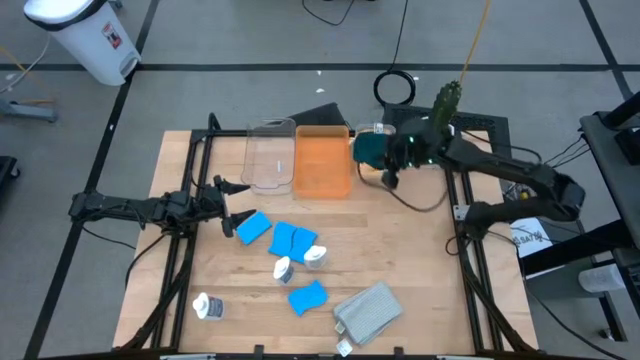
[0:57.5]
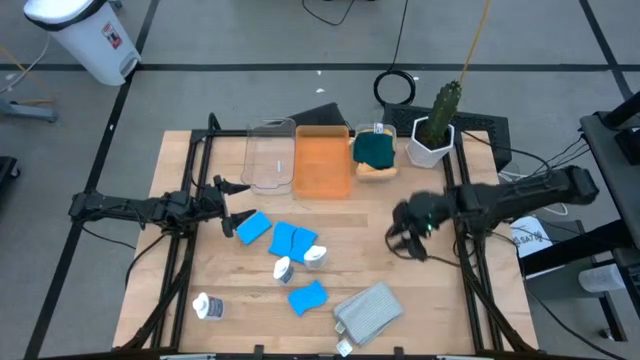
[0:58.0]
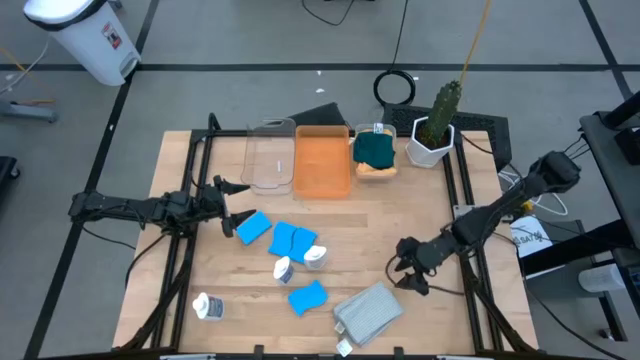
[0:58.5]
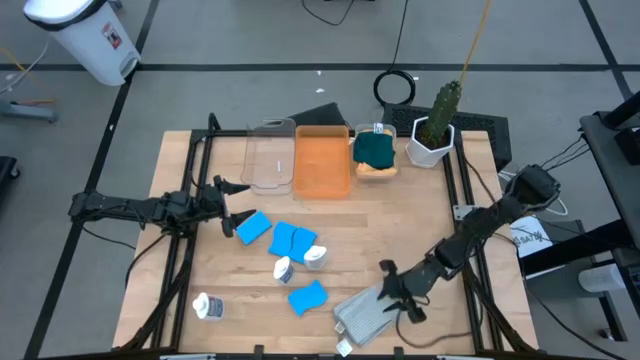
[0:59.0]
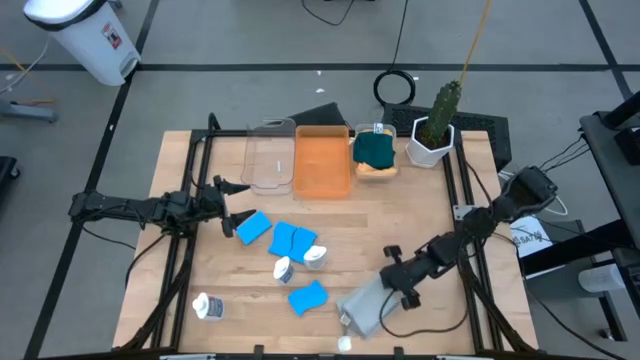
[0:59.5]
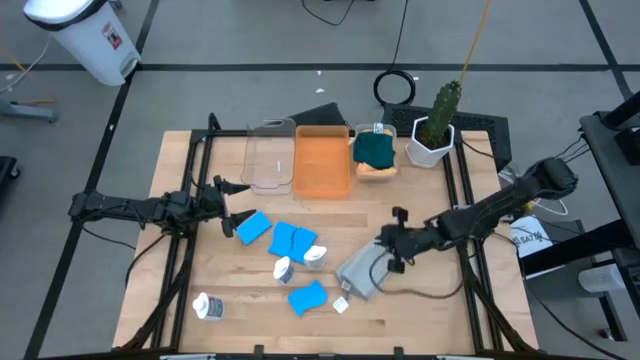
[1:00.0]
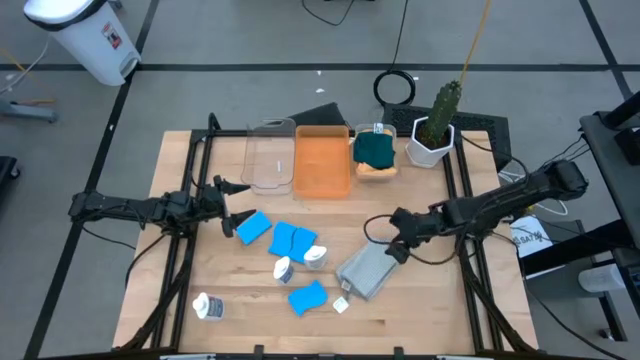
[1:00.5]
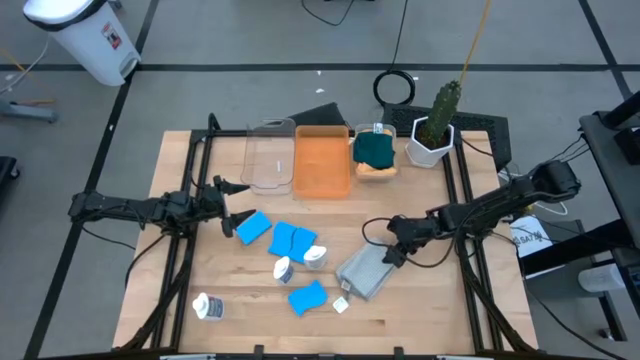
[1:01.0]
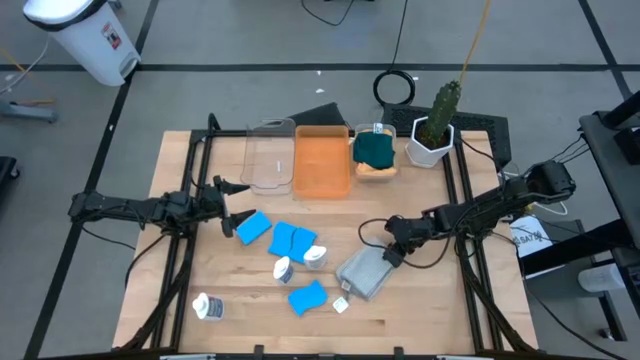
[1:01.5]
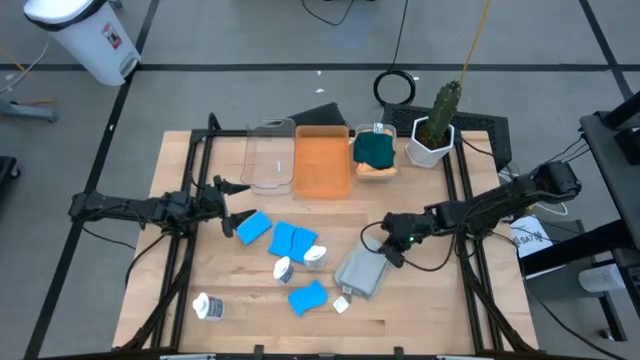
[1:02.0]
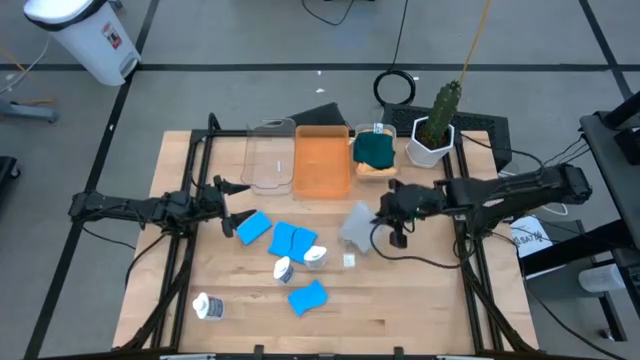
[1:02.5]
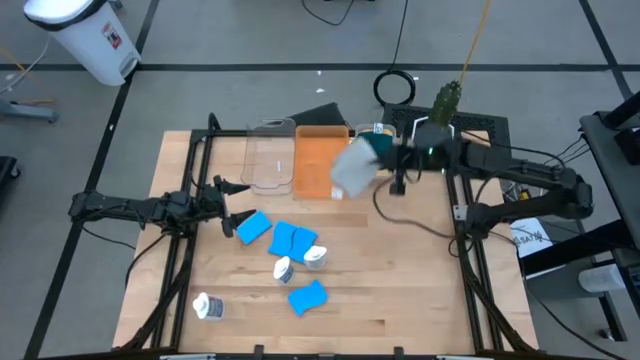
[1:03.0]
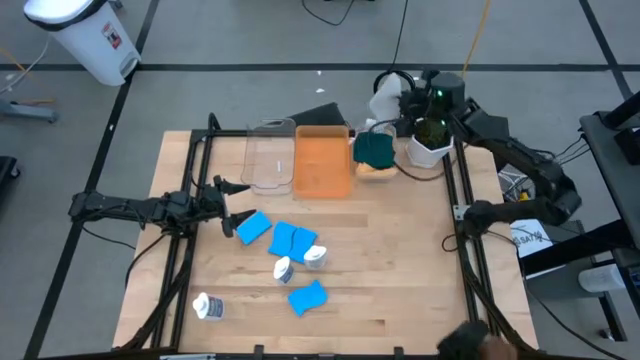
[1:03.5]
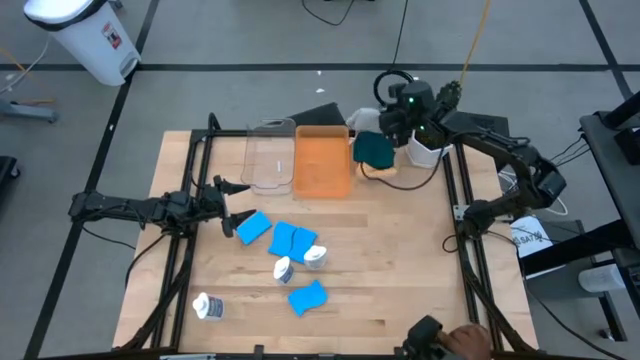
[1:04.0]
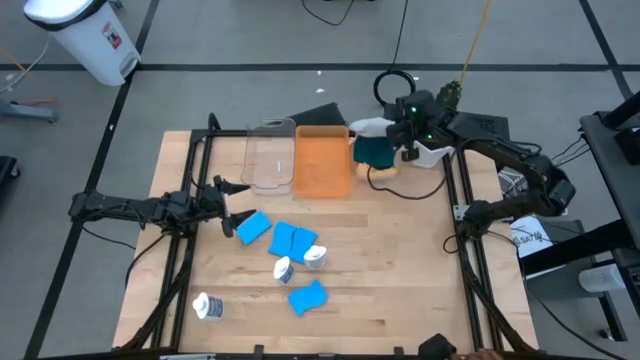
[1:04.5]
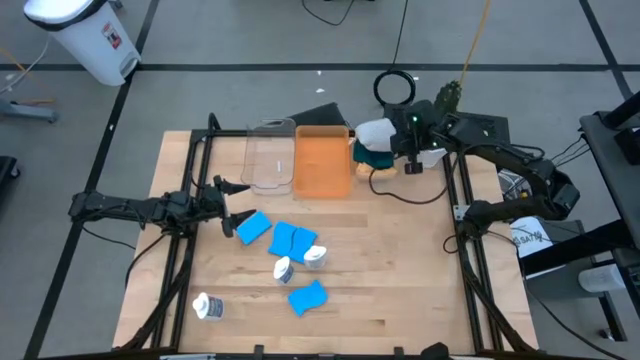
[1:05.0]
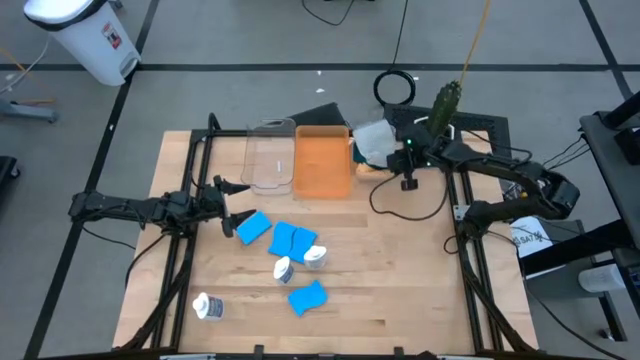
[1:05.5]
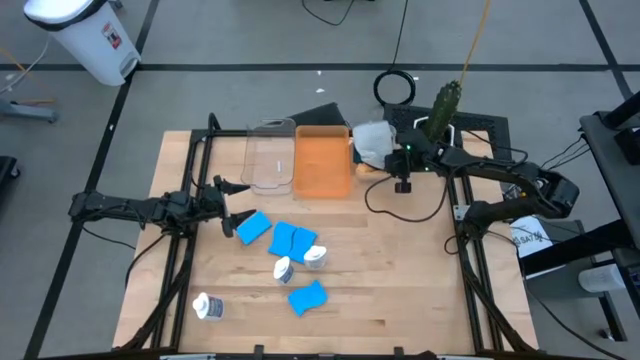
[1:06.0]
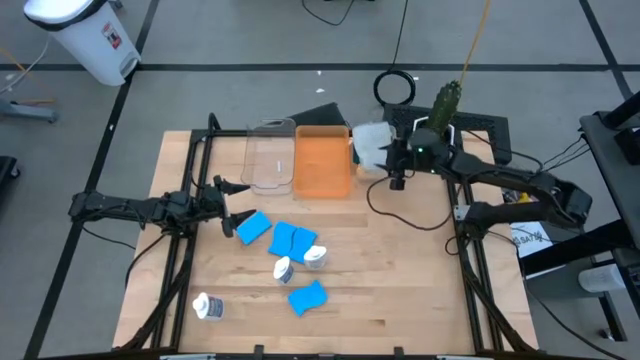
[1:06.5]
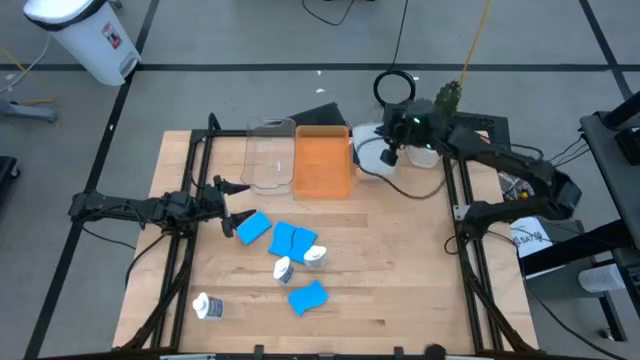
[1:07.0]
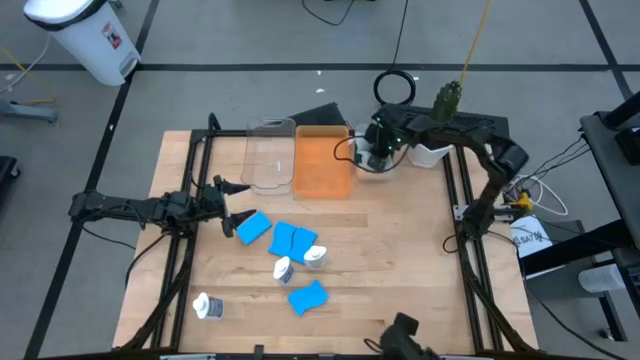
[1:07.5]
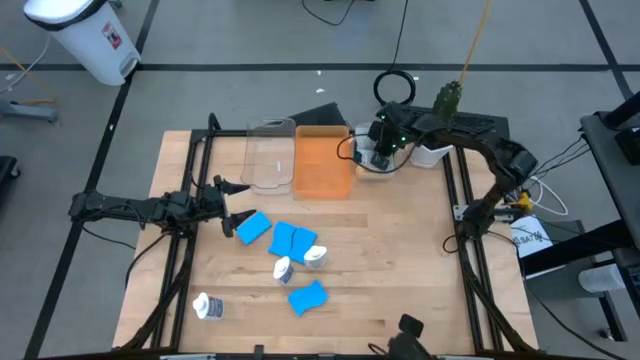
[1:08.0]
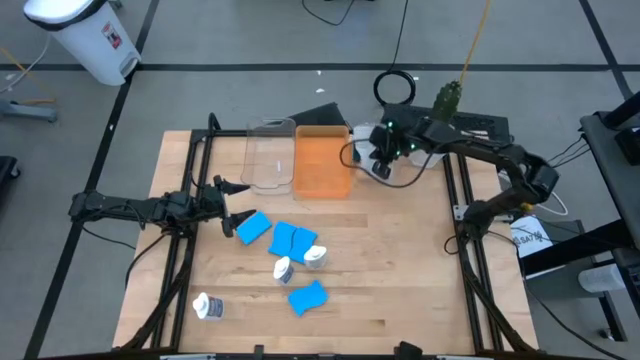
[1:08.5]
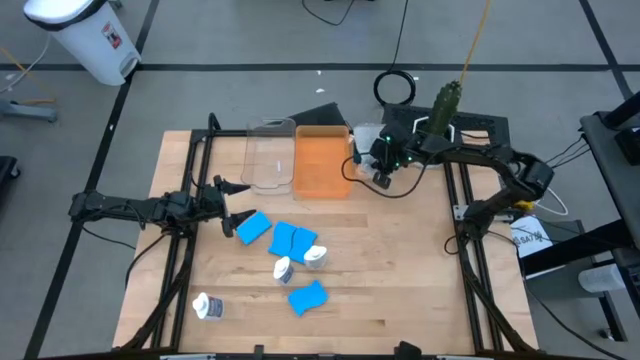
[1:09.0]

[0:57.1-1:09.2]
Task: Pick & Place Kitchen Items
Put the gray microfiber cloth into the white bin

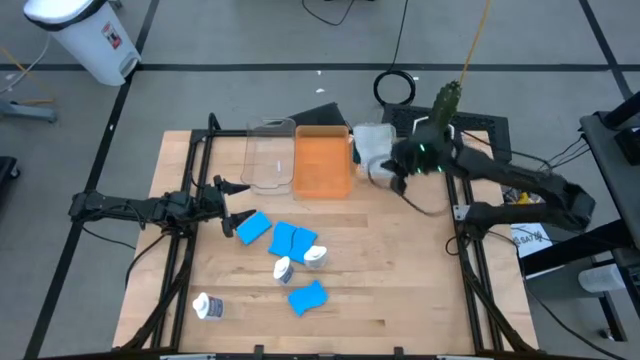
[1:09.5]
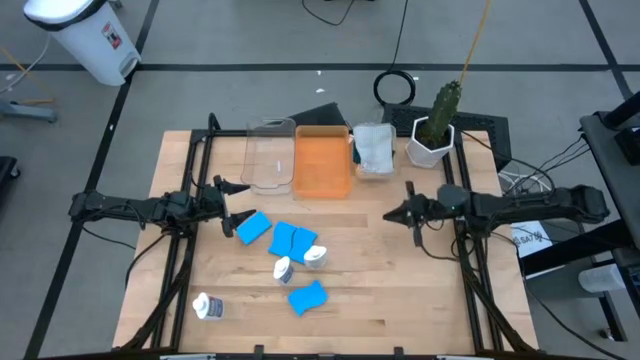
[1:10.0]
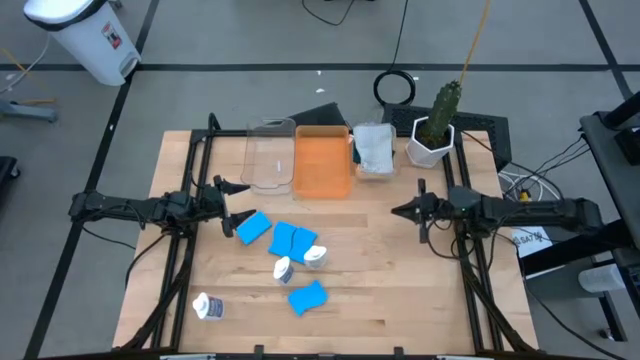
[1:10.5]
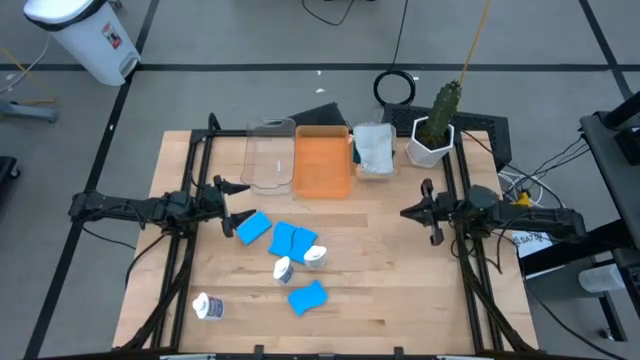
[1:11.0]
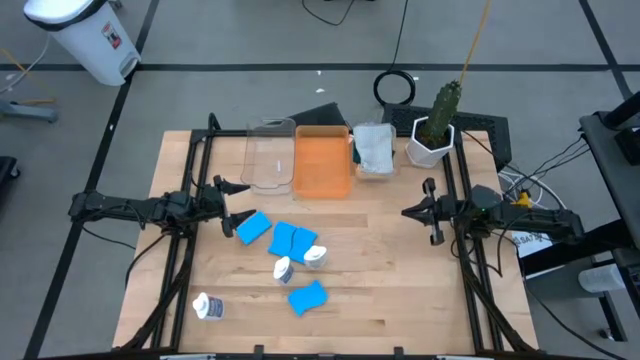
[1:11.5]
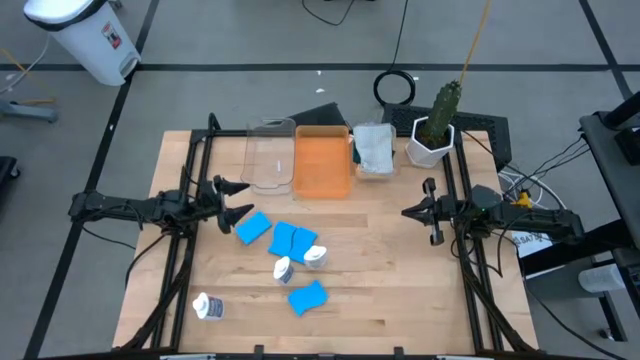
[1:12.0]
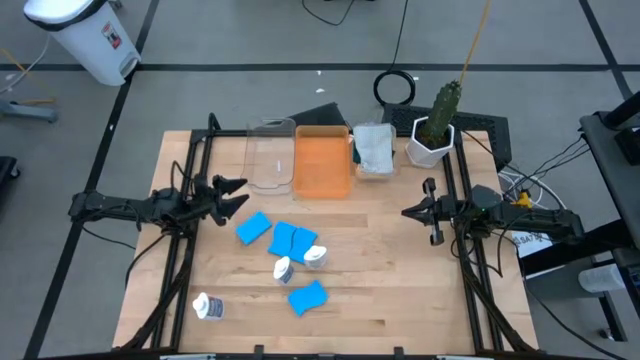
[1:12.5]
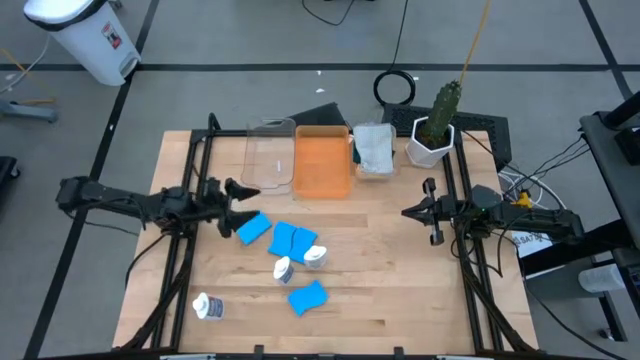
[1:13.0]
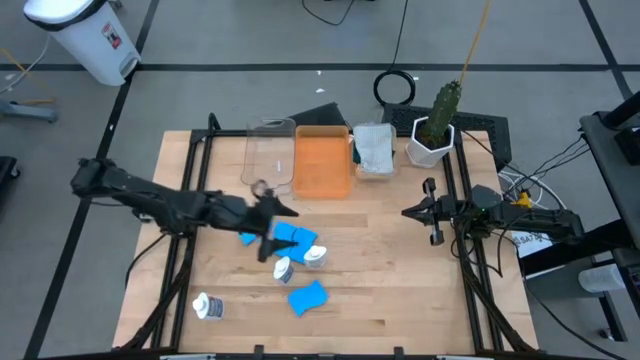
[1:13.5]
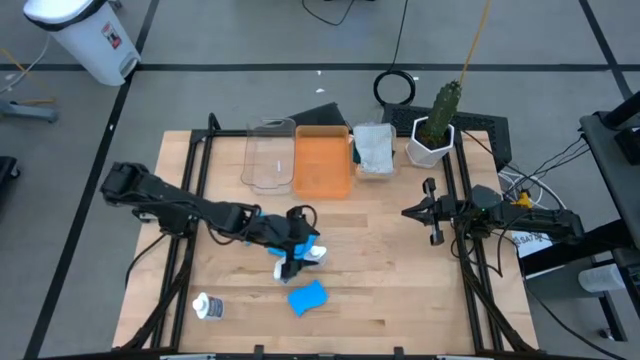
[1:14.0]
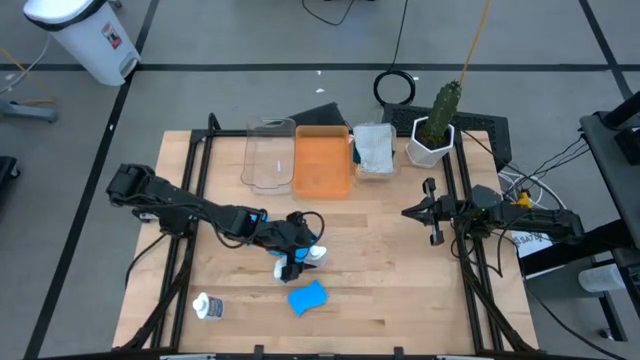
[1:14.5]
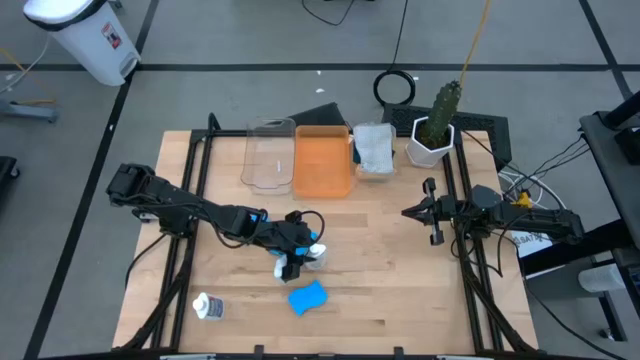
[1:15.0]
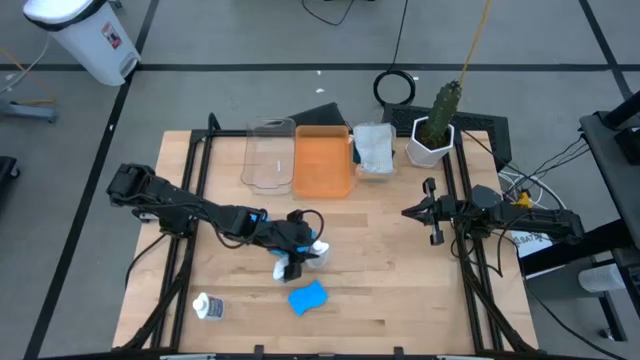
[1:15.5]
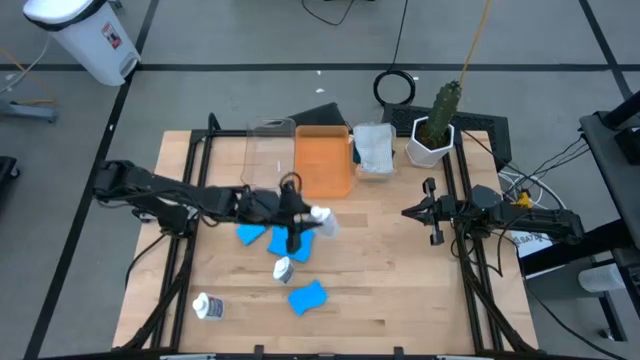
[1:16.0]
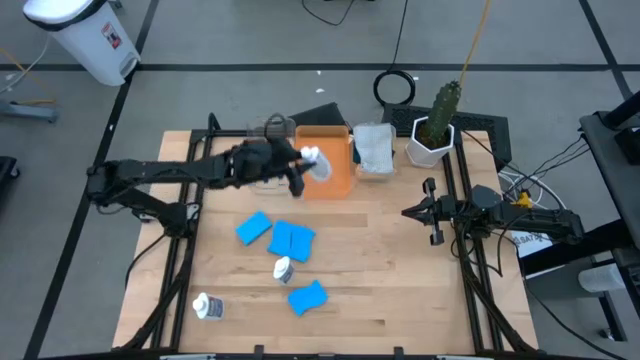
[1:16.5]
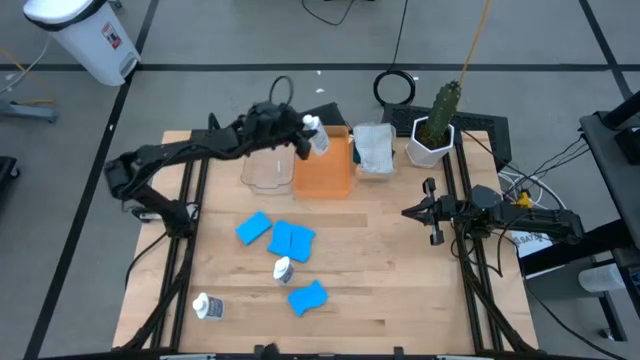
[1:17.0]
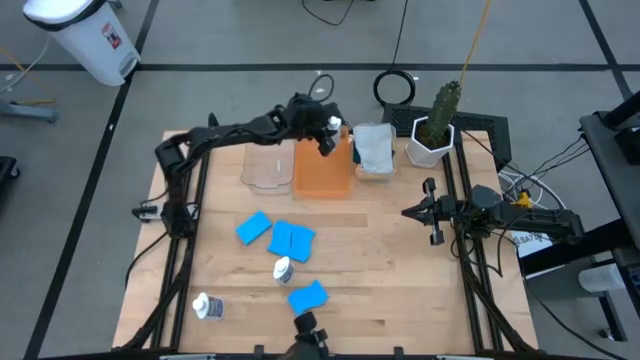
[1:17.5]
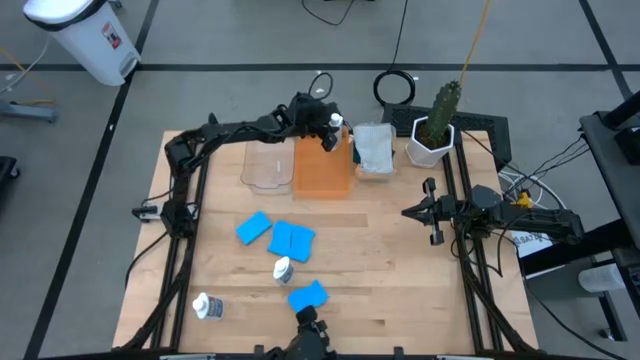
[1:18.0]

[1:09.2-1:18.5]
Put the white plastic restorer bottle into the orange bin
